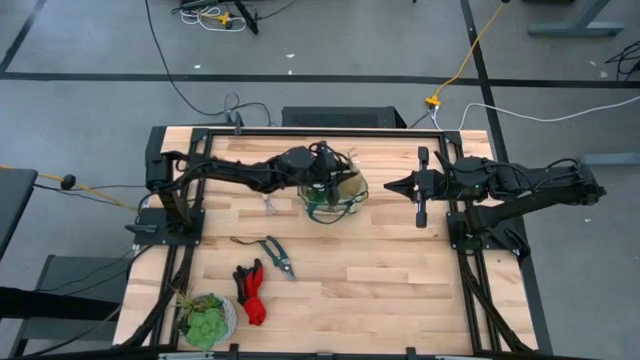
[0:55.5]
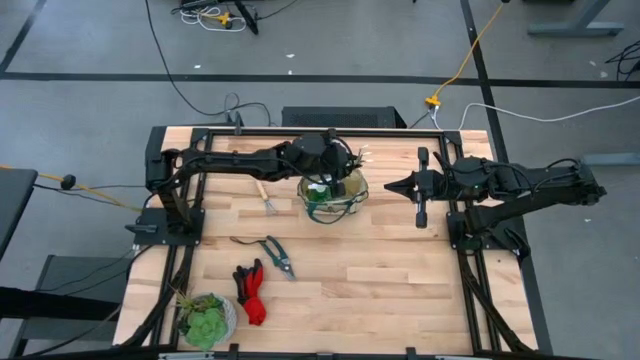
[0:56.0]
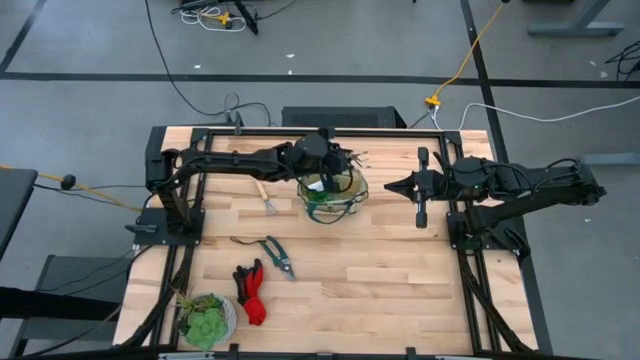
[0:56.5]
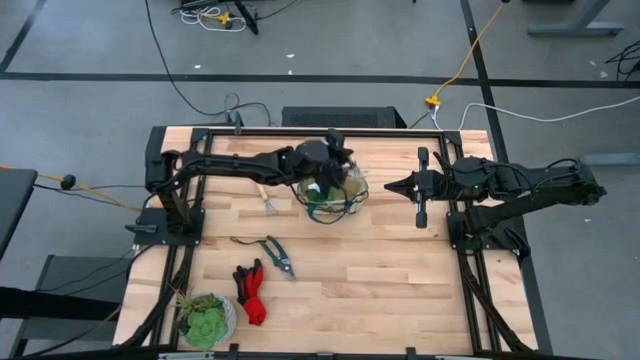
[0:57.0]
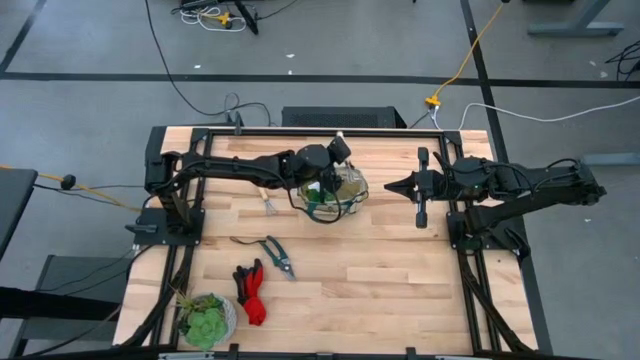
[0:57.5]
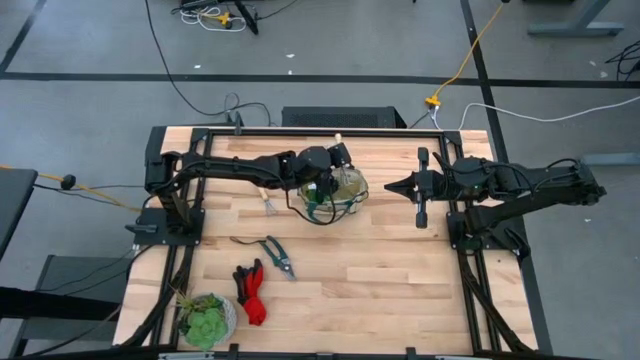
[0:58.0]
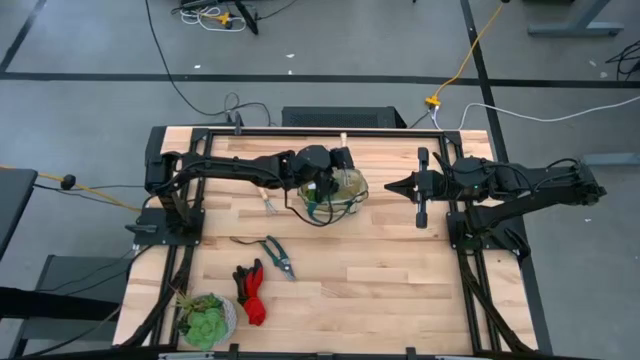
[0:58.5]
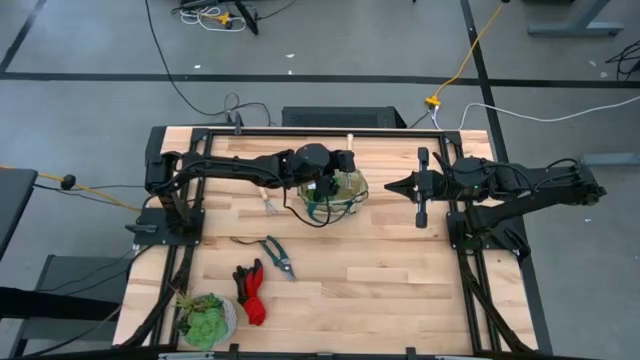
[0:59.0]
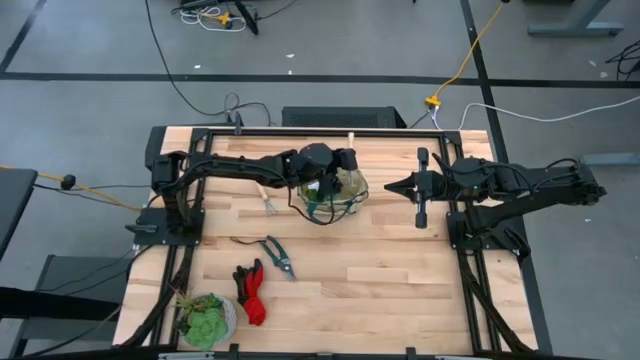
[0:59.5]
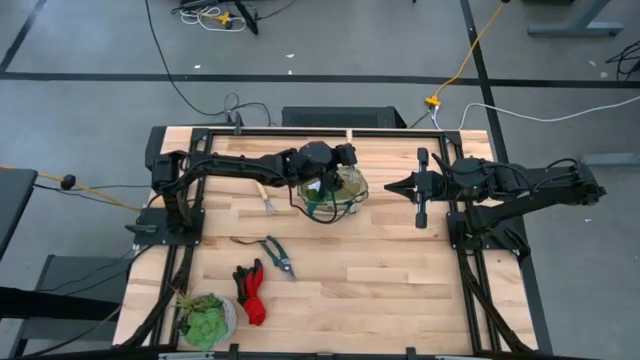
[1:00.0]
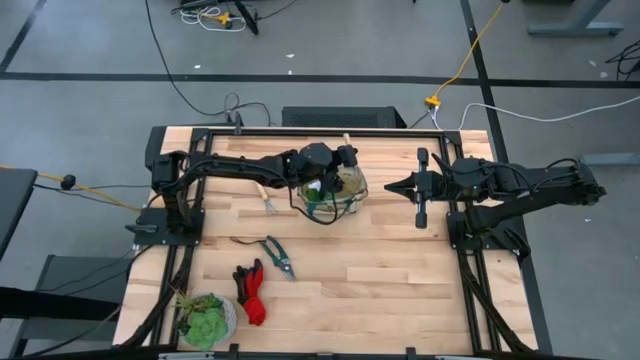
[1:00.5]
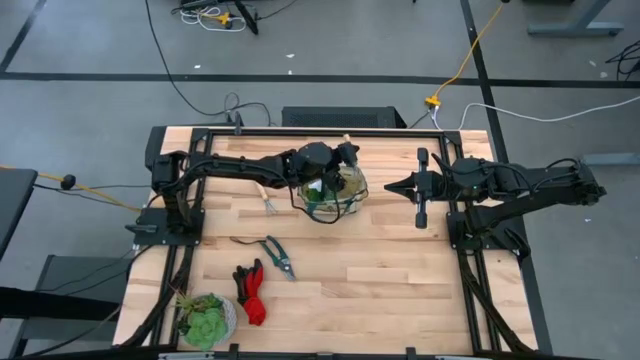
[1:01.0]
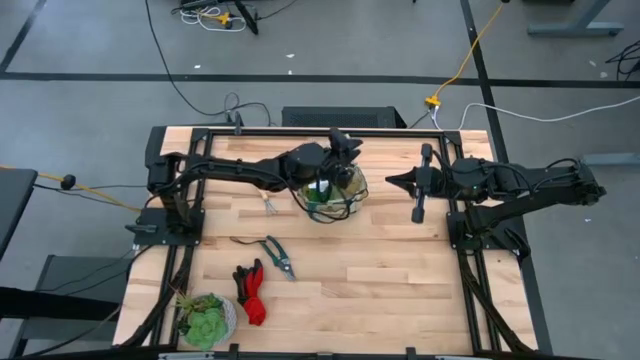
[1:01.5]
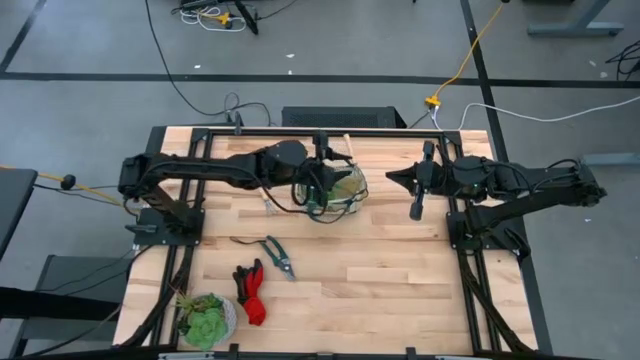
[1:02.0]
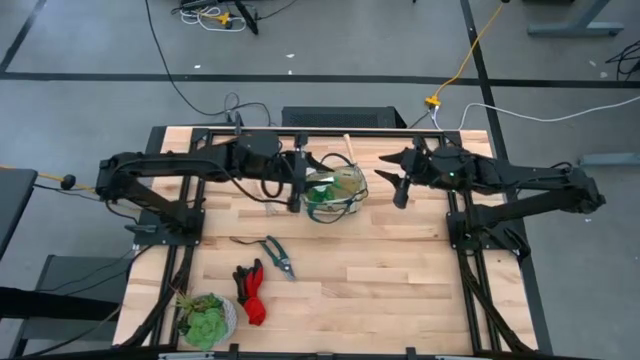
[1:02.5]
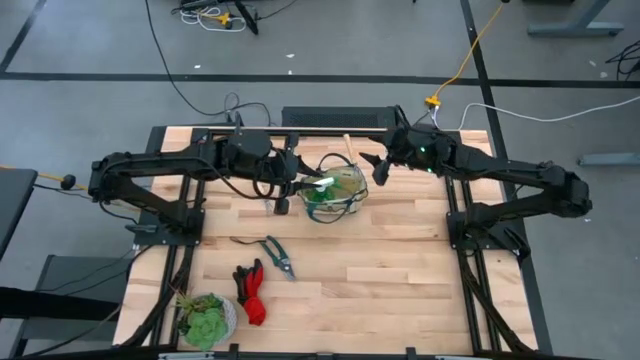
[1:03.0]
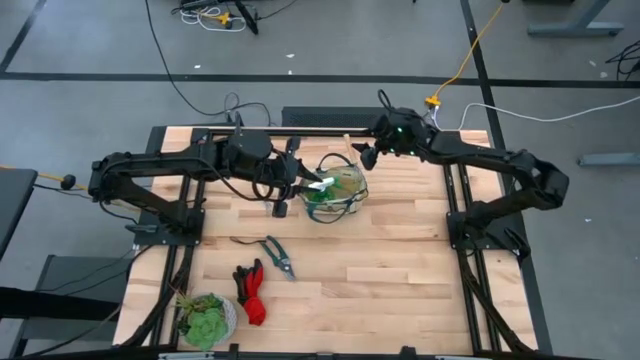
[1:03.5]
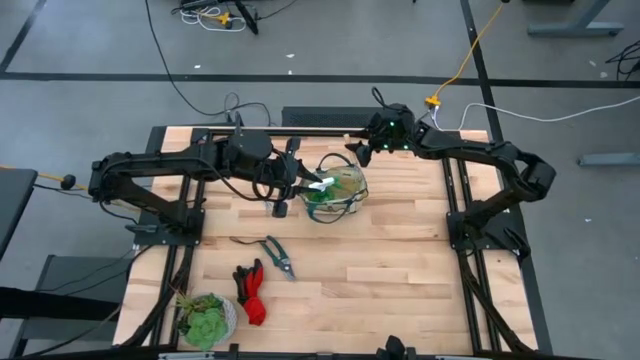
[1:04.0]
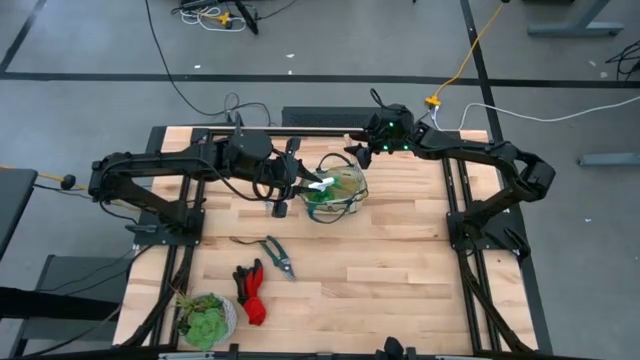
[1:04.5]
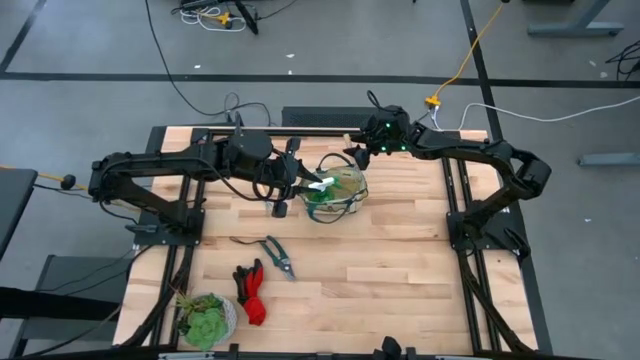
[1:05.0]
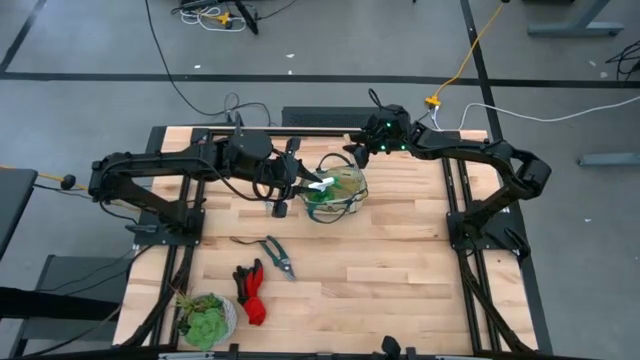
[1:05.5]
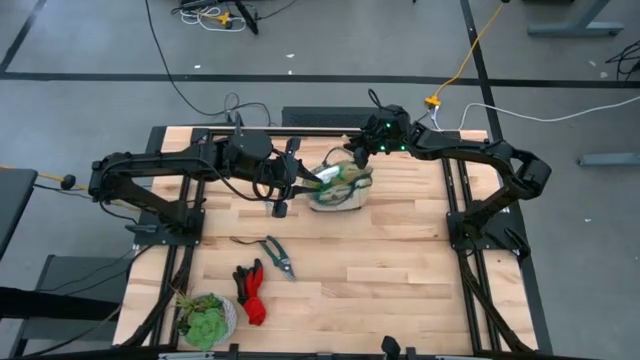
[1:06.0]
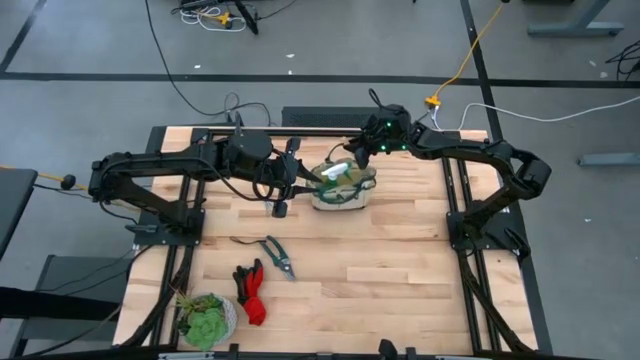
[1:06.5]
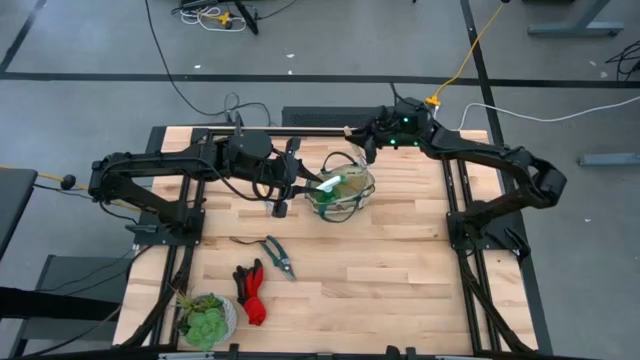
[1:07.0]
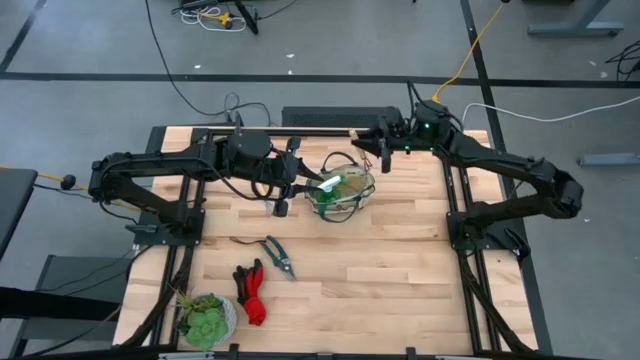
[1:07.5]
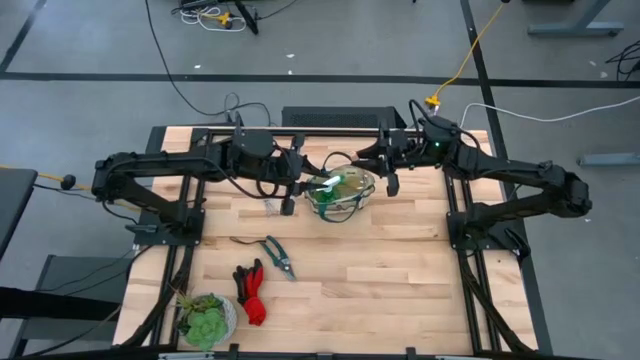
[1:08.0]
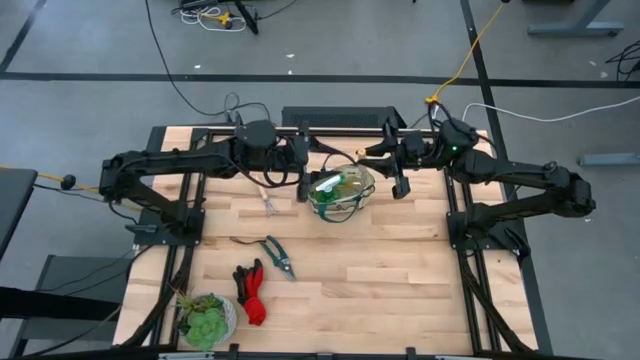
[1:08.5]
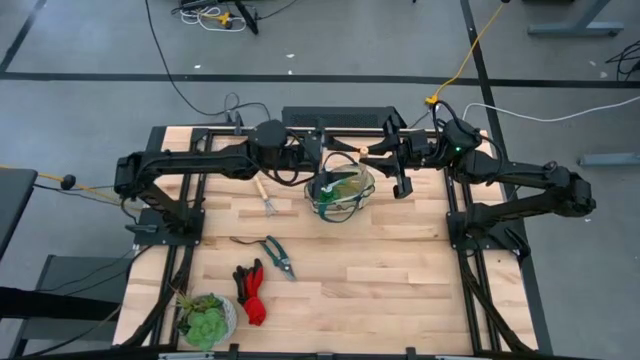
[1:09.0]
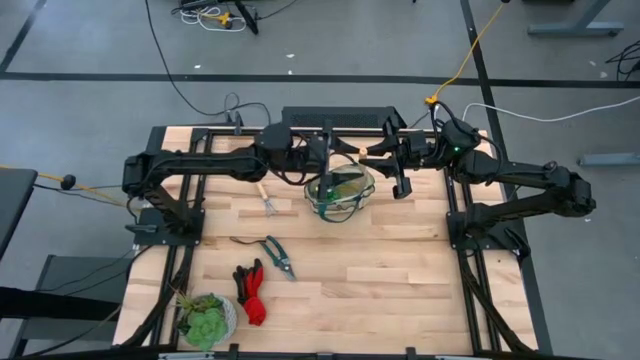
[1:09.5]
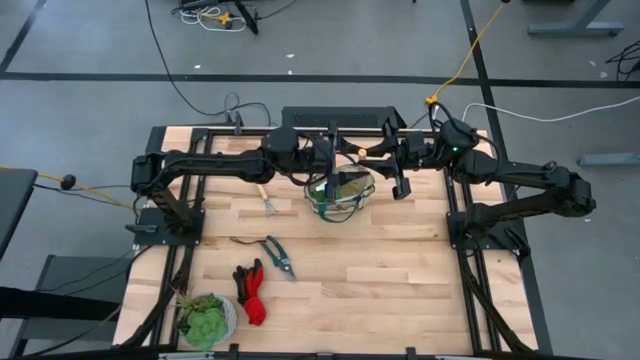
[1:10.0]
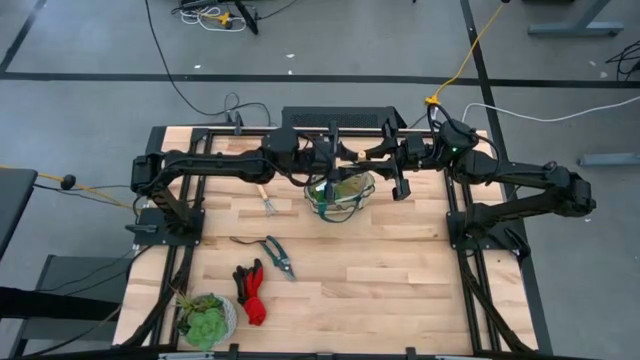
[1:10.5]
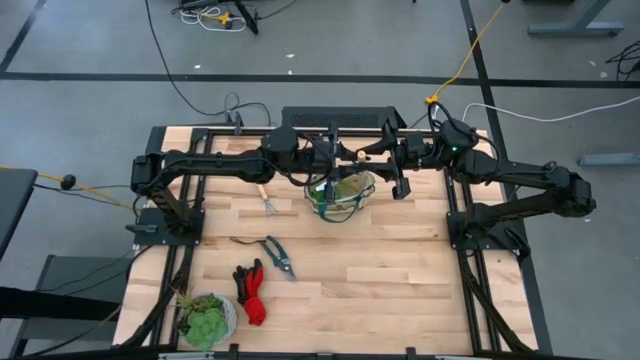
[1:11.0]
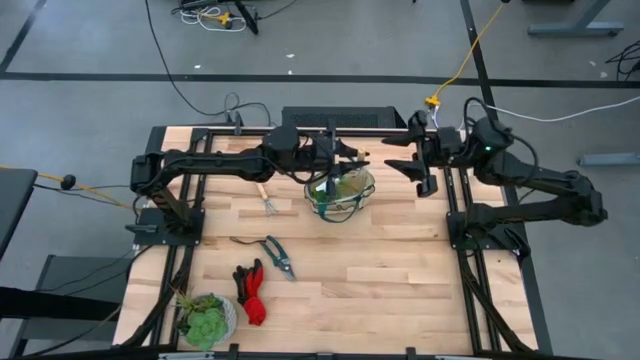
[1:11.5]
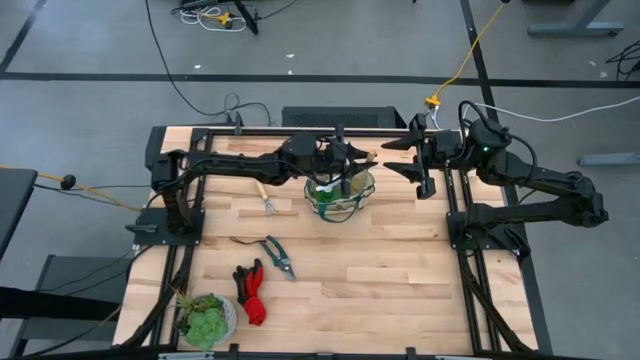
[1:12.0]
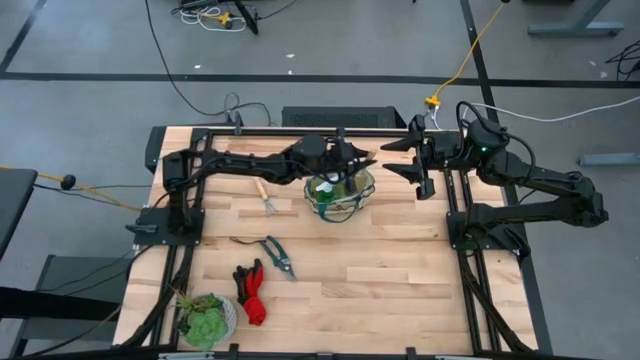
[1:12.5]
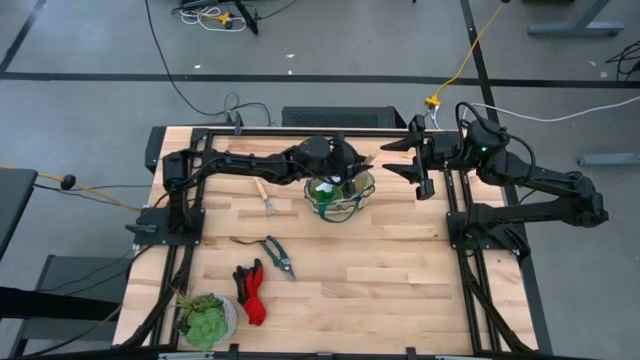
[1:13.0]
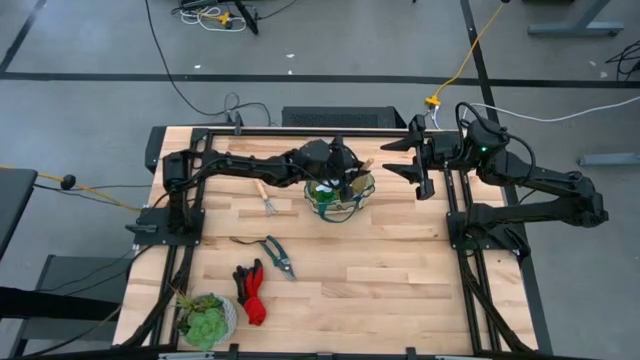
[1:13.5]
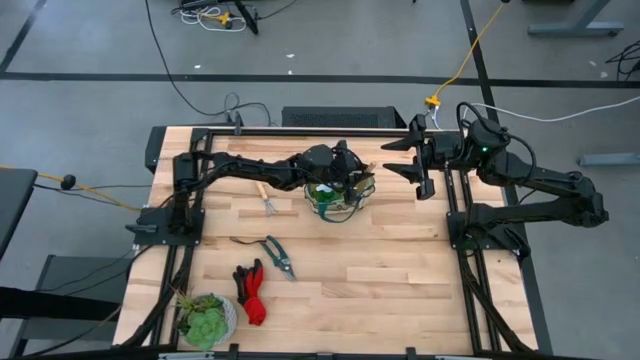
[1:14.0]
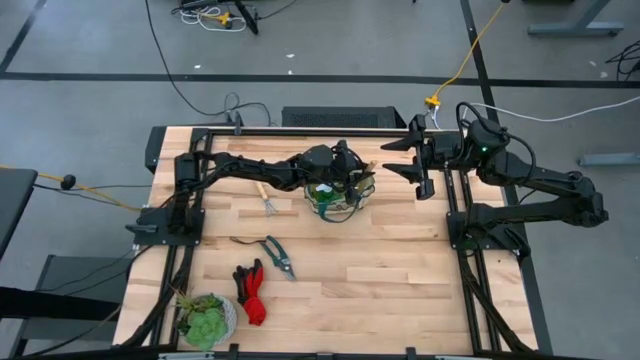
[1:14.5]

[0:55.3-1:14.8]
Task: Pick & Place Garden tools in Gardening bag
Put the bottom brown hand rake into the gardening bag

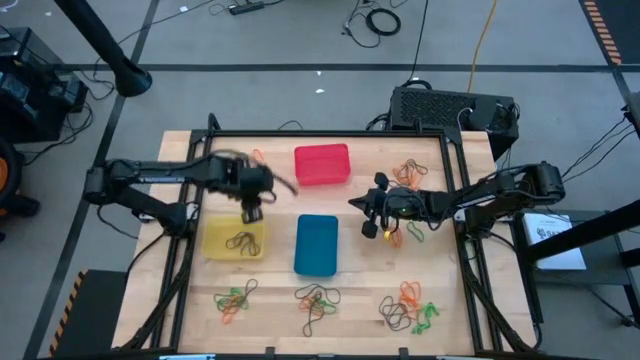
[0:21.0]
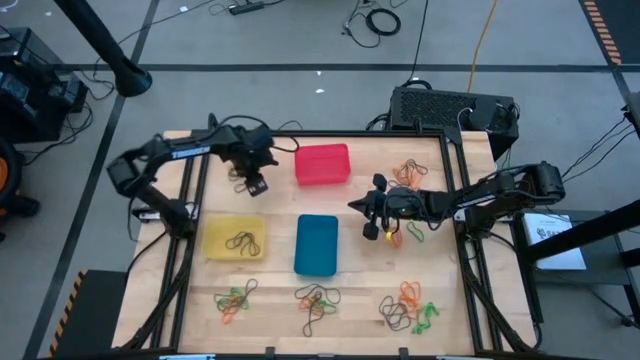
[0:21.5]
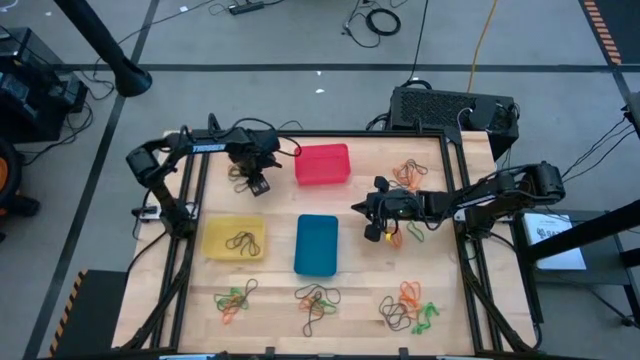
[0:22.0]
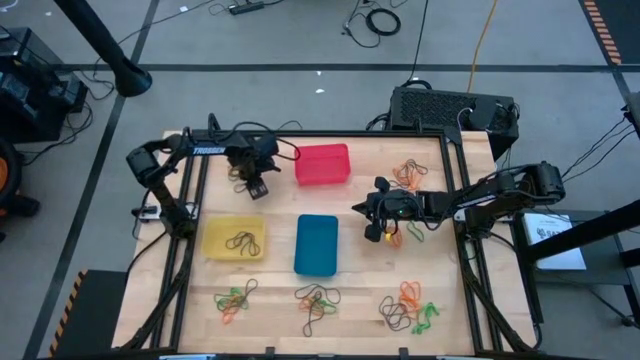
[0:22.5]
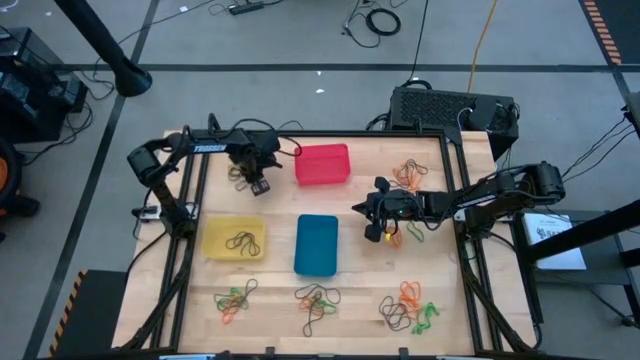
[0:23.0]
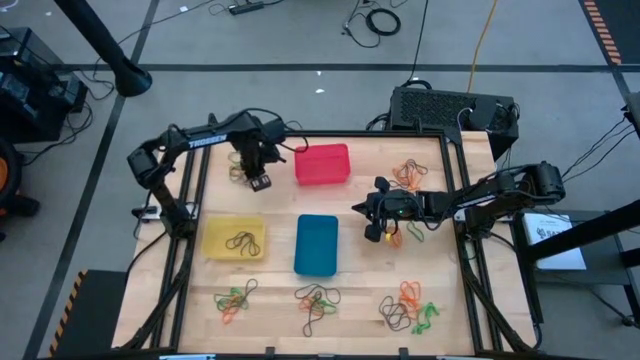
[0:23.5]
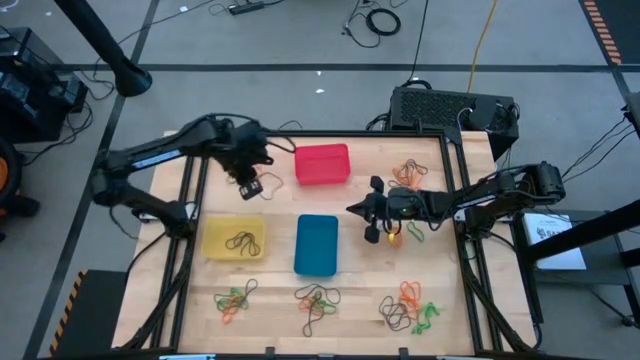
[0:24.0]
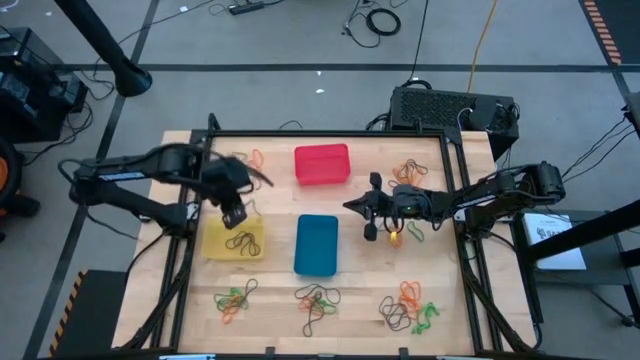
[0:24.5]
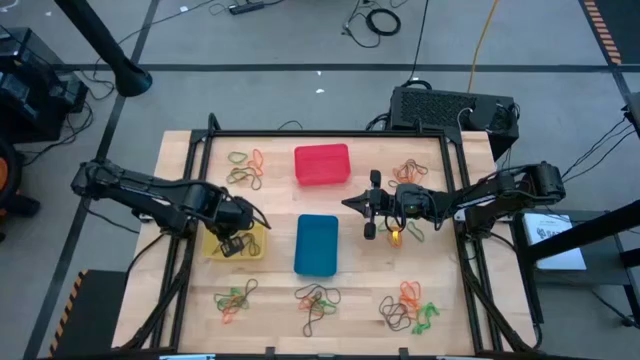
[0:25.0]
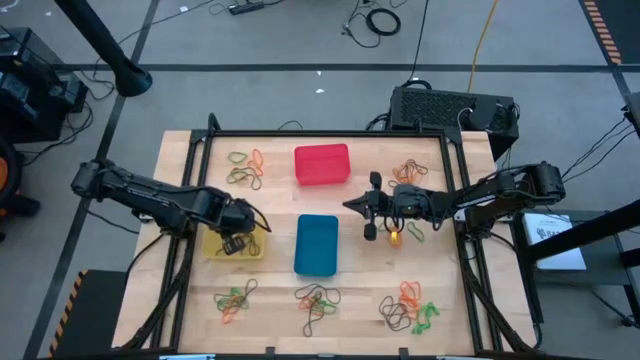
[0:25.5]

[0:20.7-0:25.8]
Task: Sort rubber bands into baskets
Put the purple rubber band into the yellow bin
